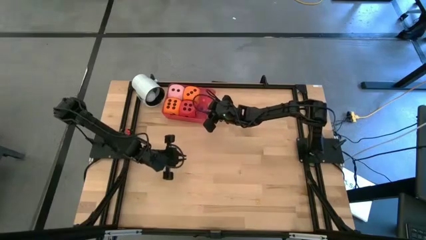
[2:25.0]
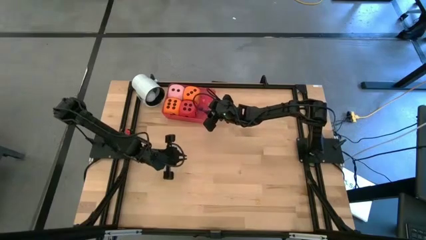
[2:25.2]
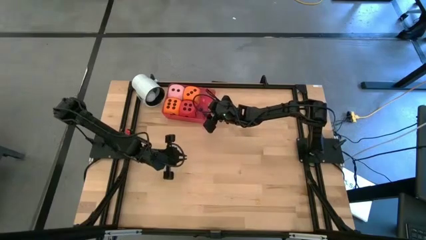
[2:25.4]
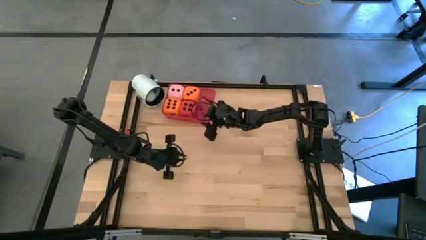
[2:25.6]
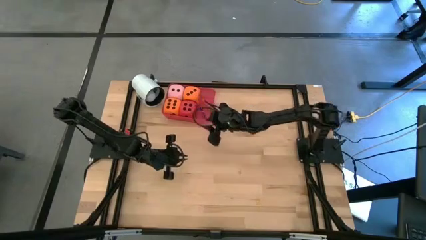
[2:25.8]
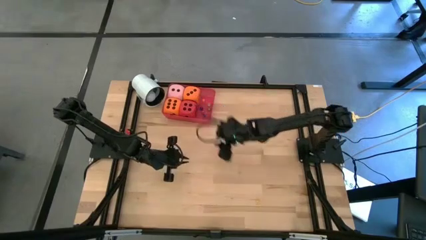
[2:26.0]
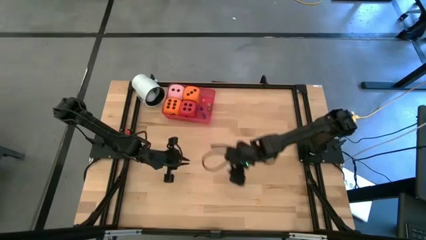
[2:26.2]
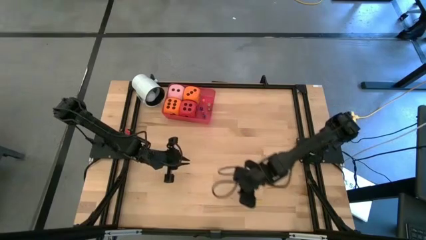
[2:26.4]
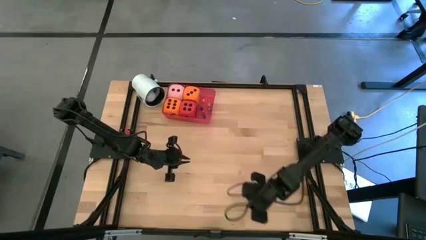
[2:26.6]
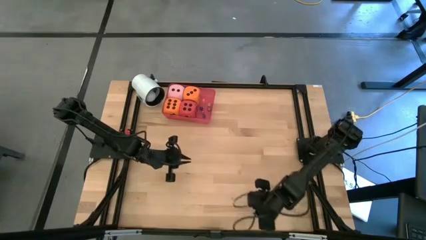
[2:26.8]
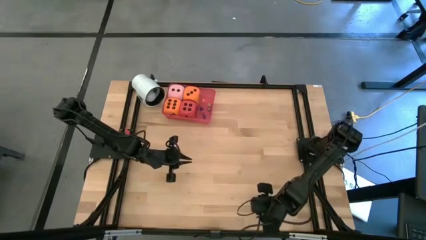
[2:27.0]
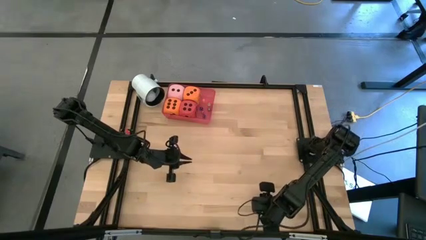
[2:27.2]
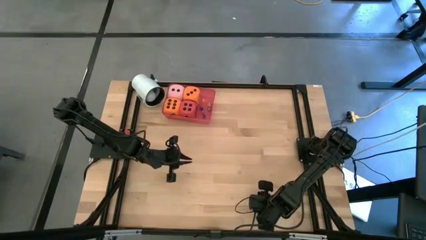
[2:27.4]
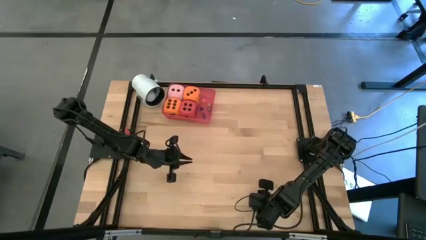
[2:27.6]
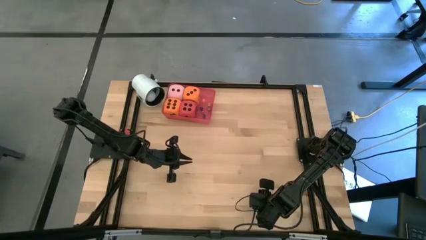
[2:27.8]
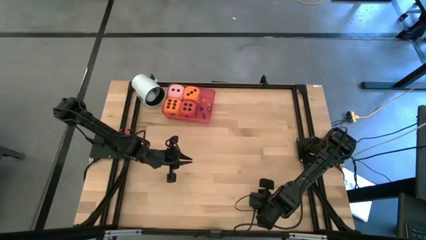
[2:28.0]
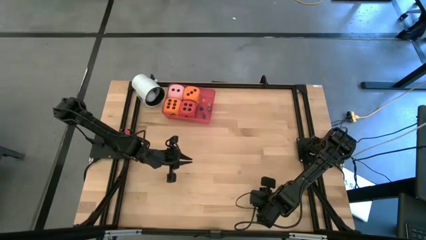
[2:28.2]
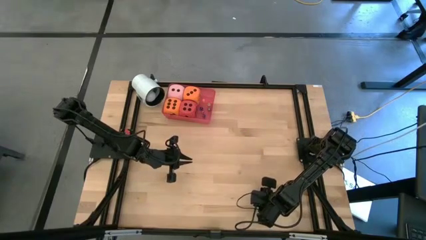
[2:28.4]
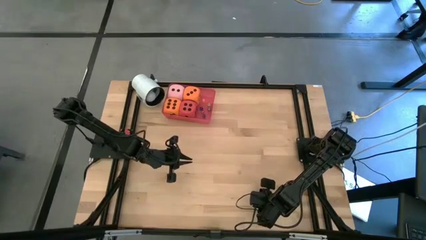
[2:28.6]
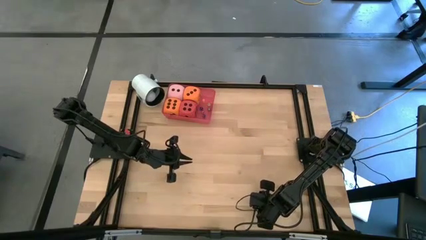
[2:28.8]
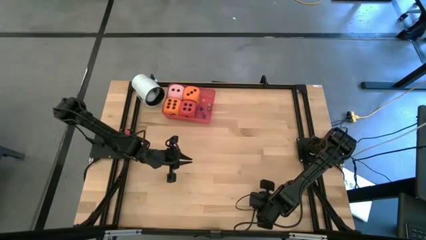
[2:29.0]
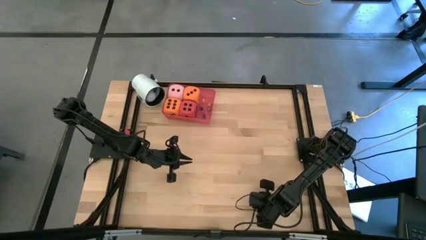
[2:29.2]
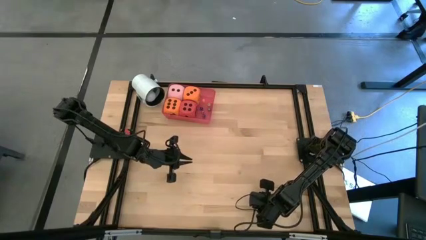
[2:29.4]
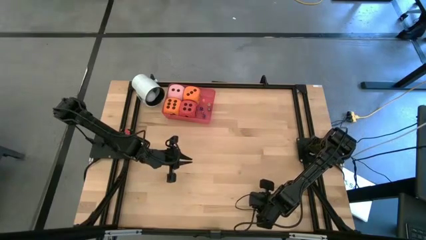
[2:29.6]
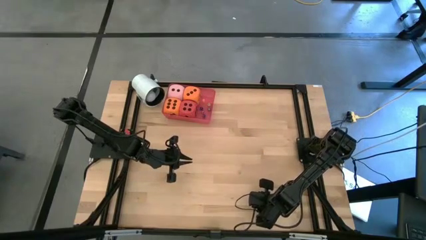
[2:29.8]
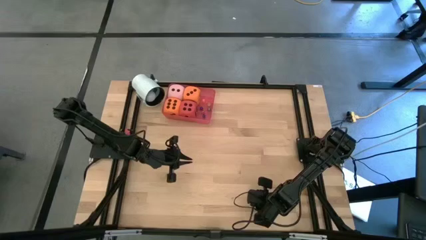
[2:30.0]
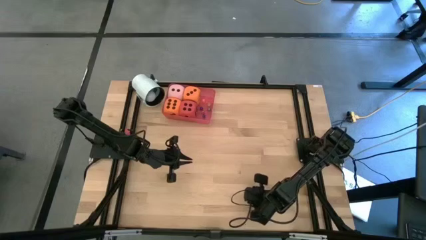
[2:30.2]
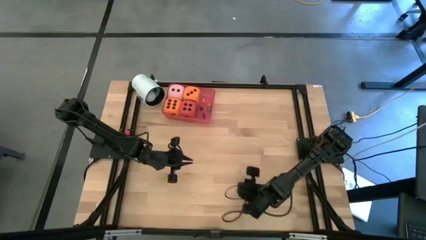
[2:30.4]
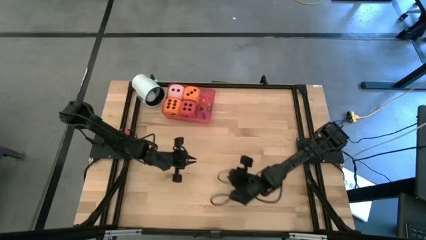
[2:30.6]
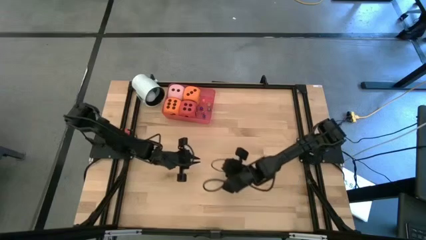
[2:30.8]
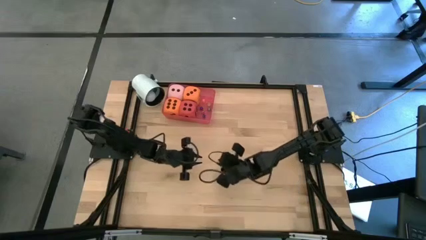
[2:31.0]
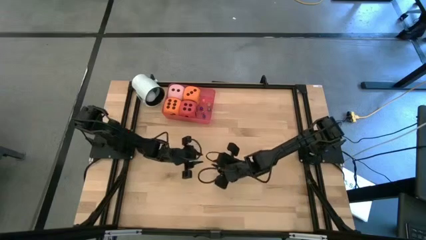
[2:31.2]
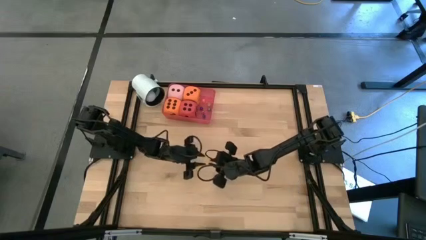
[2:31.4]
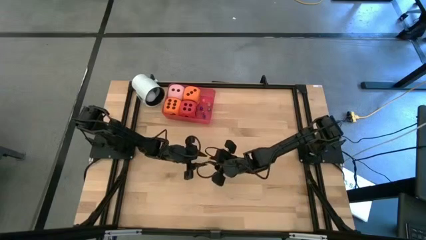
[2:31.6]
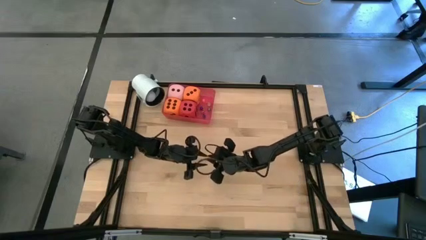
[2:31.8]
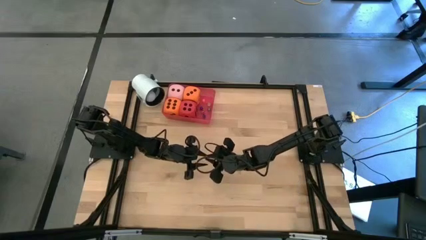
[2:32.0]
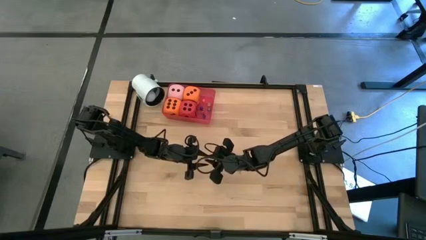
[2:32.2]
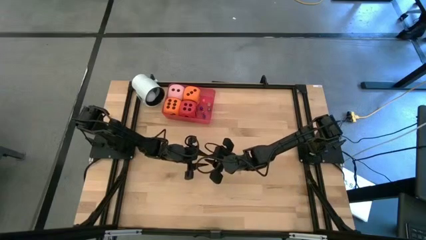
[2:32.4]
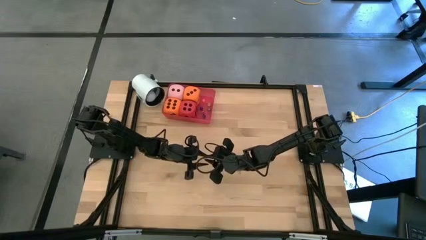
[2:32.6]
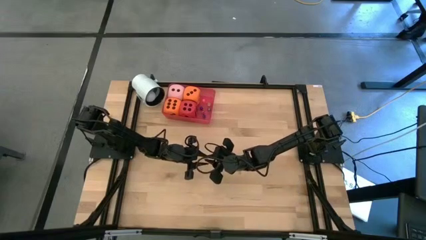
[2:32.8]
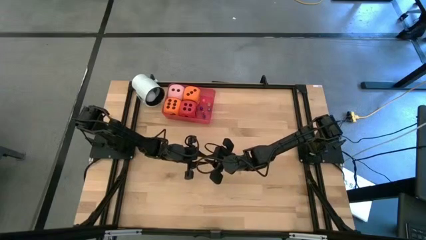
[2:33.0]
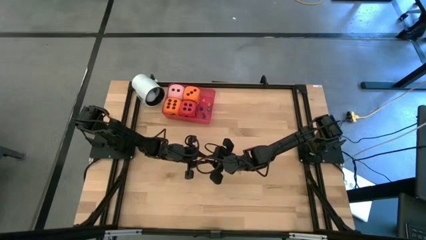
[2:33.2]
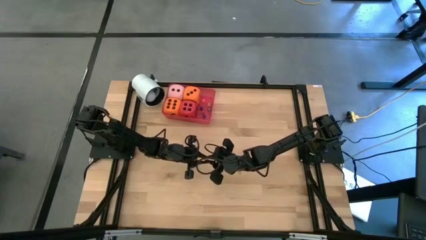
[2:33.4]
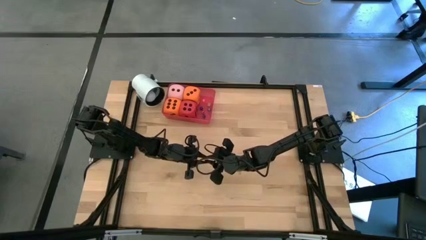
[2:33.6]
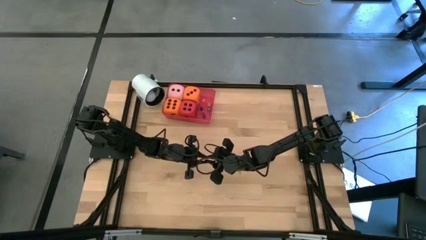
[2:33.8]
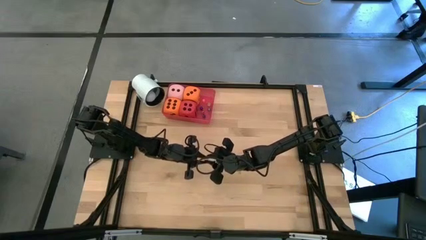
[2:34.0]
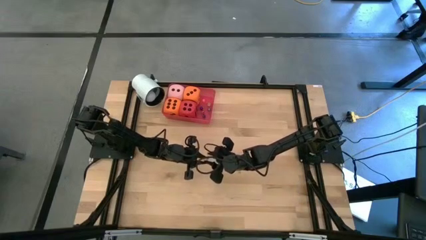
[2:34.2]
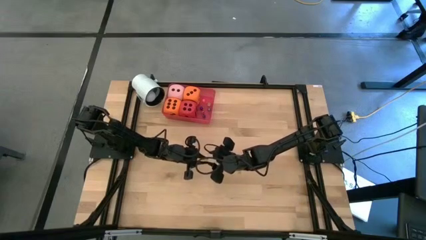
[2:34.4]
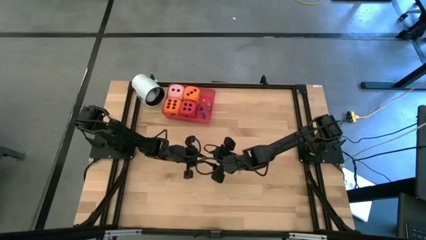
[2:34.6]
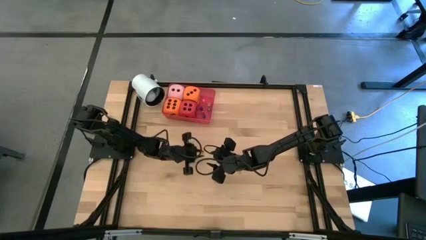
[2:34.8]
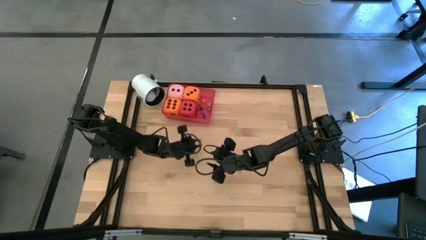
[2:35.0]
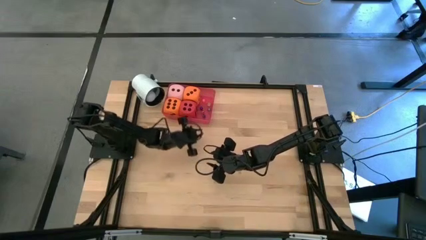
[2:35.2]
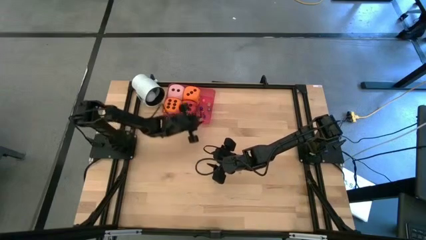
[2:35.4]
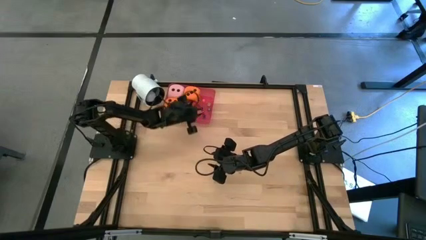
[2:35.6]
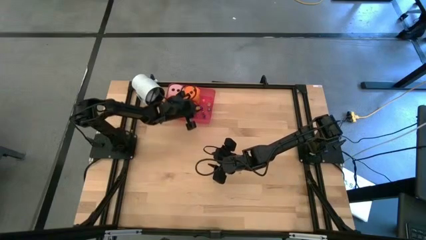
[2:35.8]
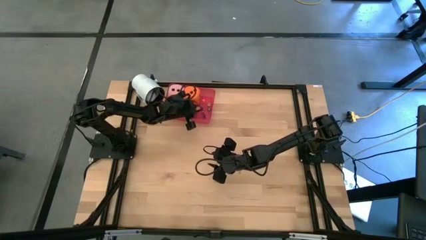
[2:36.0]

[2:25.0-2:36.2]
Task: Pick & Place Dice
Put the small yellow die into the red bin
